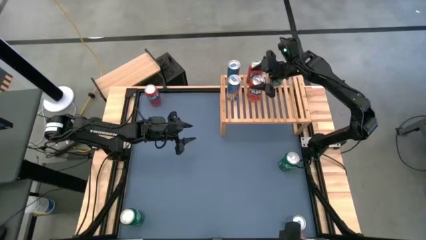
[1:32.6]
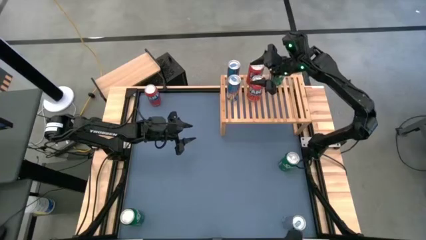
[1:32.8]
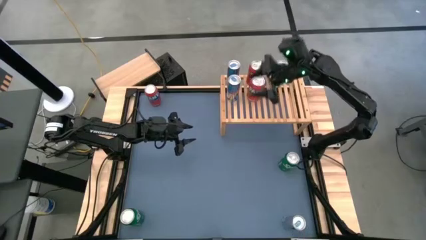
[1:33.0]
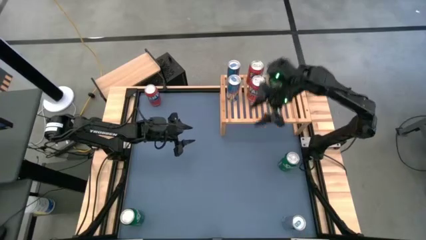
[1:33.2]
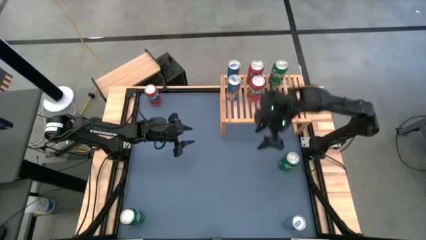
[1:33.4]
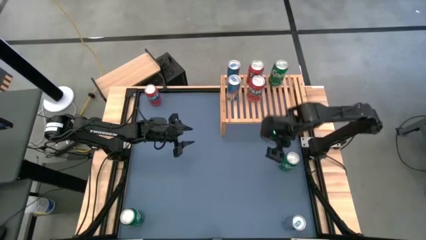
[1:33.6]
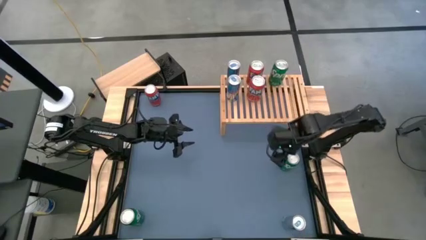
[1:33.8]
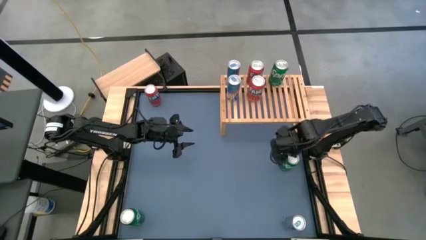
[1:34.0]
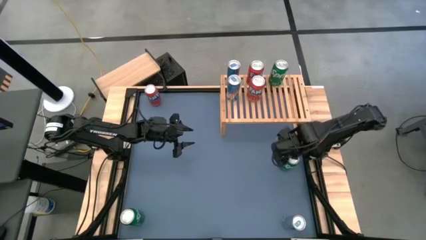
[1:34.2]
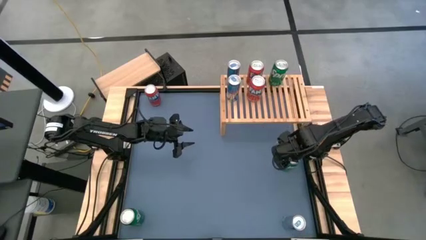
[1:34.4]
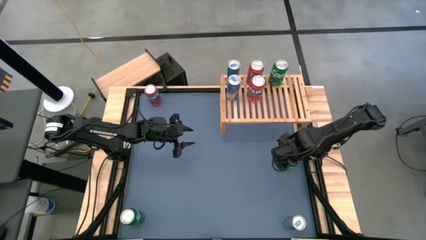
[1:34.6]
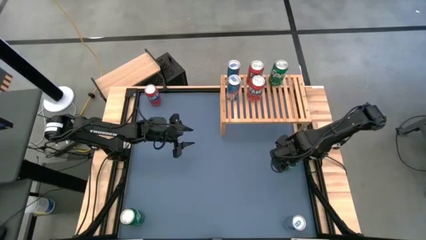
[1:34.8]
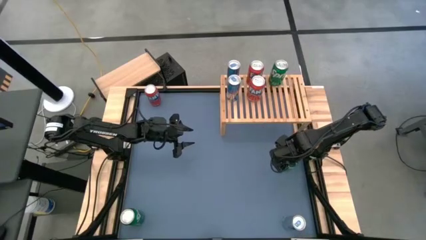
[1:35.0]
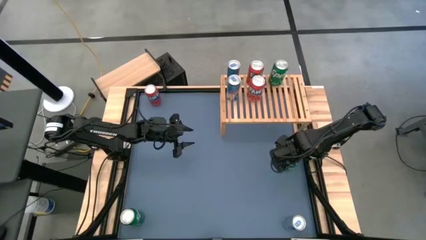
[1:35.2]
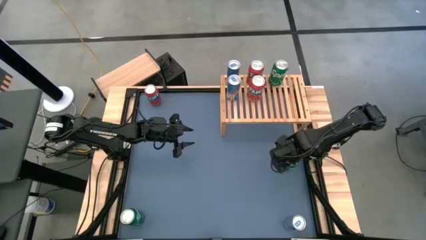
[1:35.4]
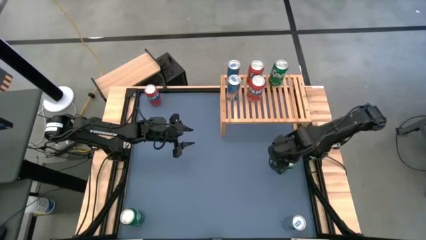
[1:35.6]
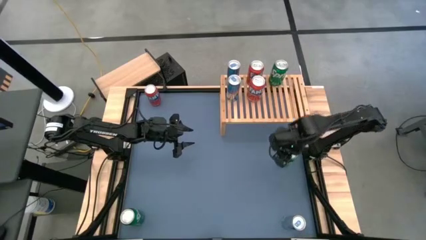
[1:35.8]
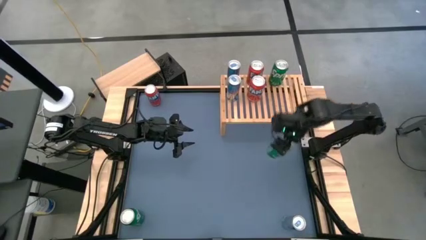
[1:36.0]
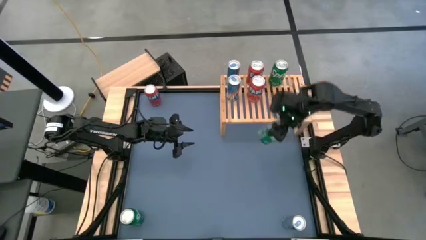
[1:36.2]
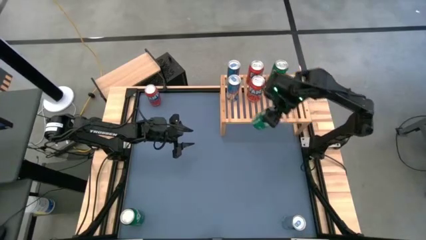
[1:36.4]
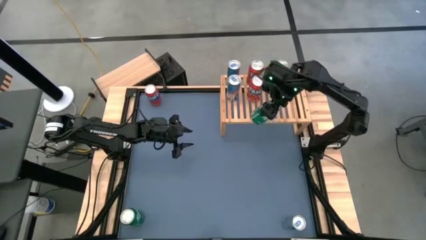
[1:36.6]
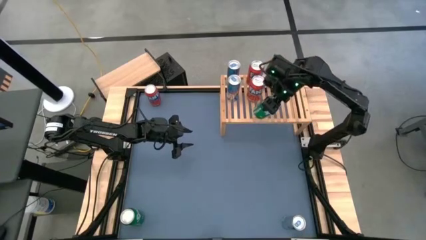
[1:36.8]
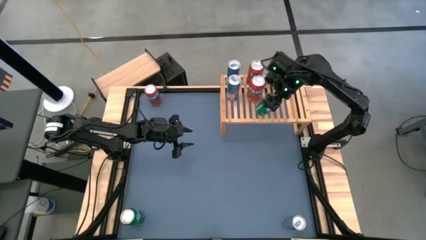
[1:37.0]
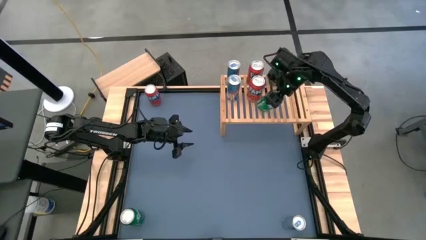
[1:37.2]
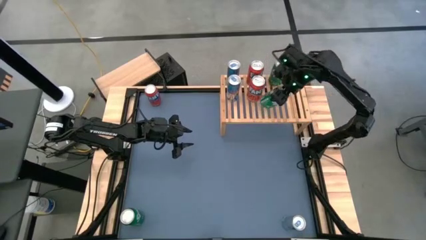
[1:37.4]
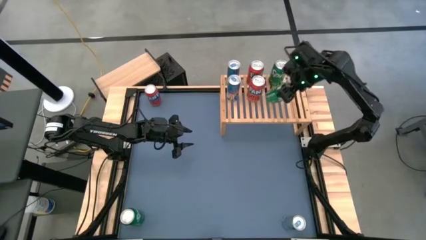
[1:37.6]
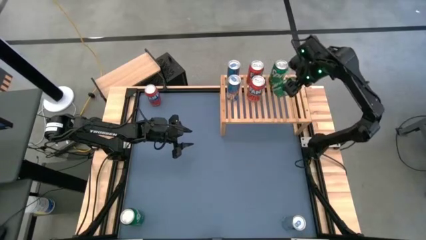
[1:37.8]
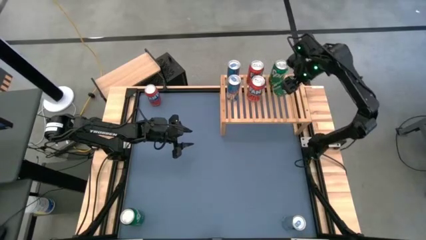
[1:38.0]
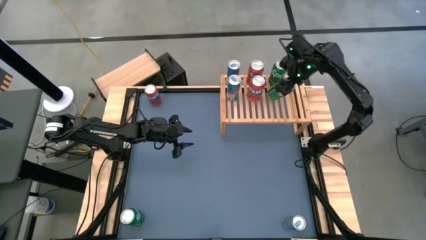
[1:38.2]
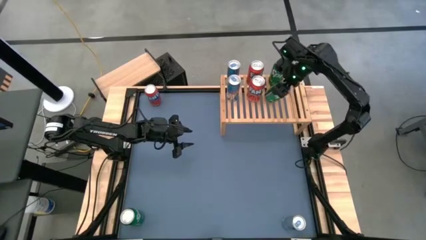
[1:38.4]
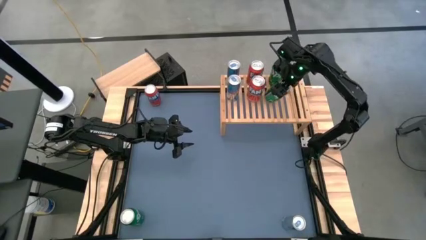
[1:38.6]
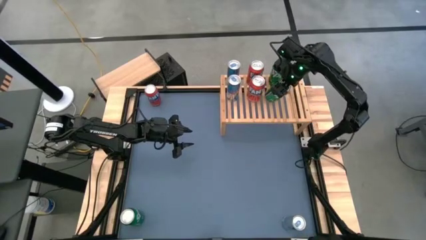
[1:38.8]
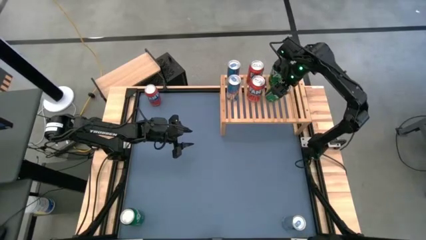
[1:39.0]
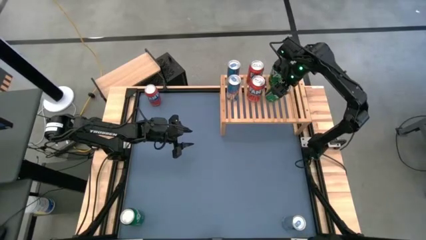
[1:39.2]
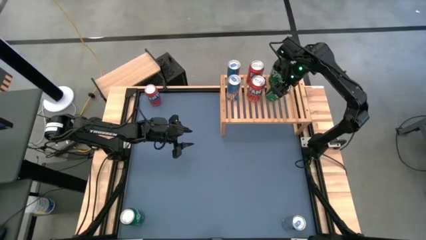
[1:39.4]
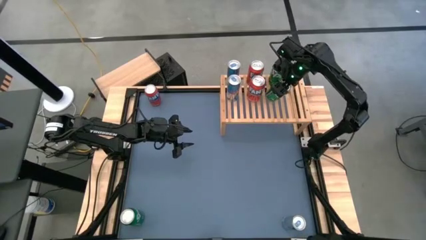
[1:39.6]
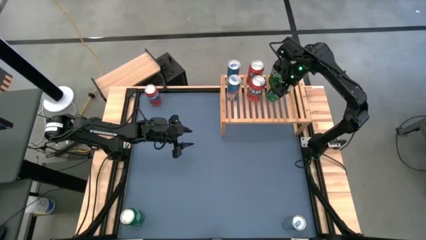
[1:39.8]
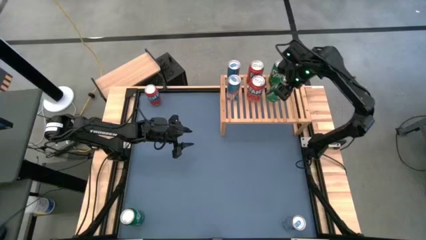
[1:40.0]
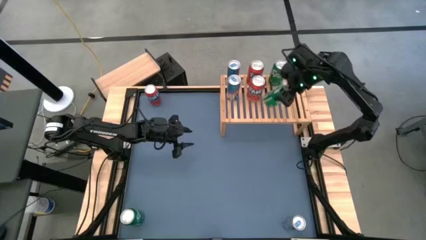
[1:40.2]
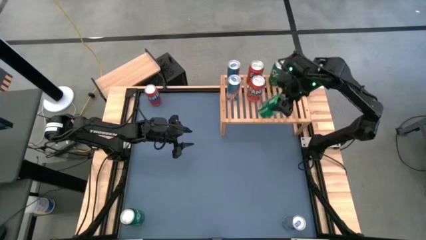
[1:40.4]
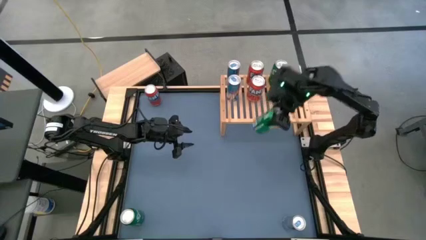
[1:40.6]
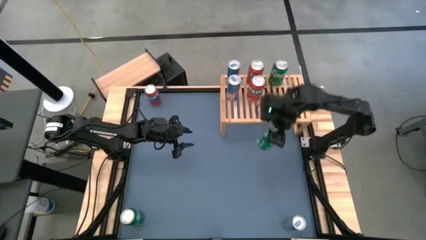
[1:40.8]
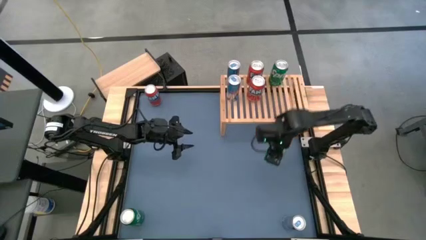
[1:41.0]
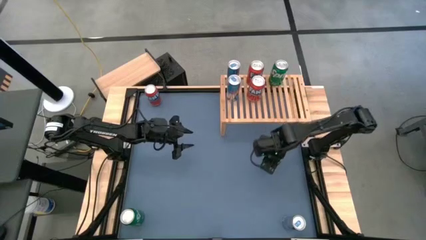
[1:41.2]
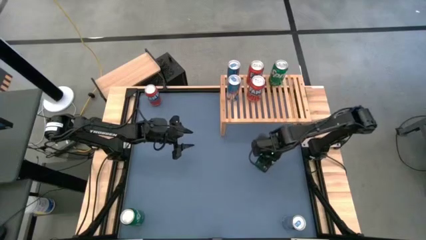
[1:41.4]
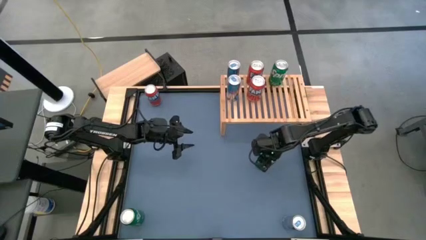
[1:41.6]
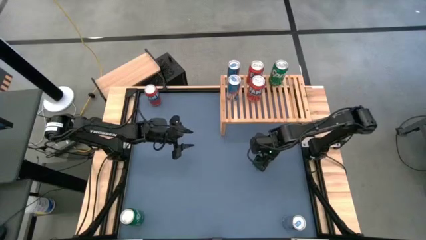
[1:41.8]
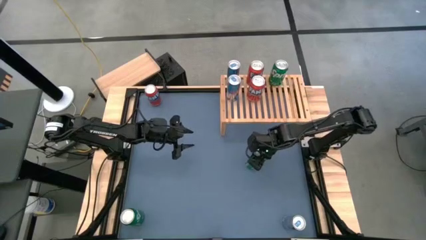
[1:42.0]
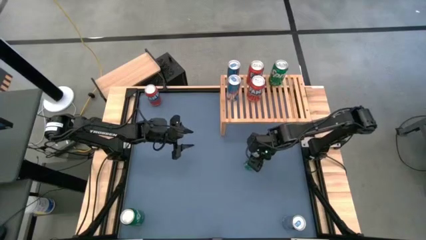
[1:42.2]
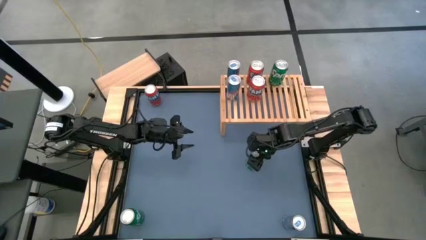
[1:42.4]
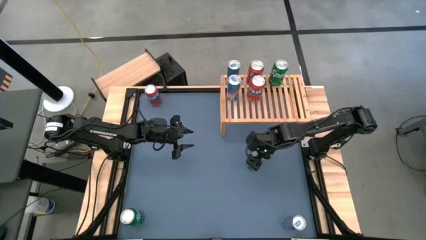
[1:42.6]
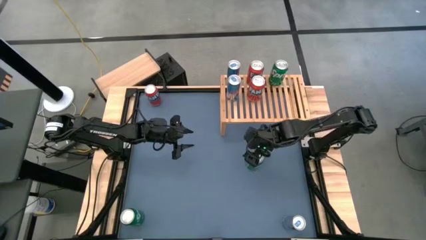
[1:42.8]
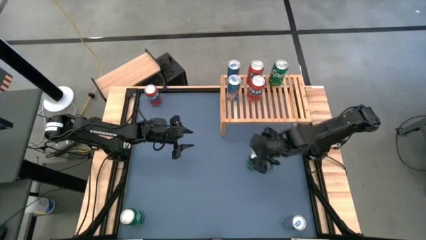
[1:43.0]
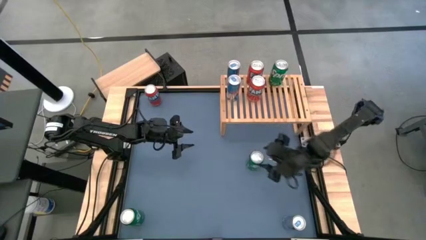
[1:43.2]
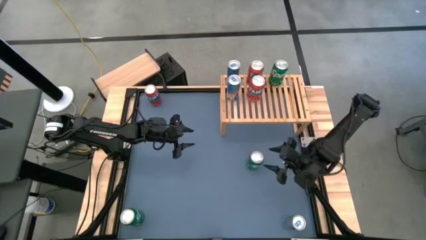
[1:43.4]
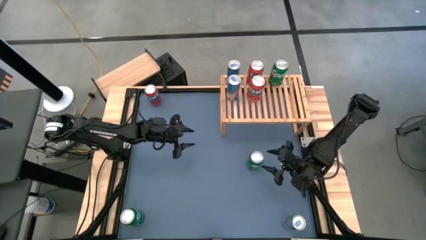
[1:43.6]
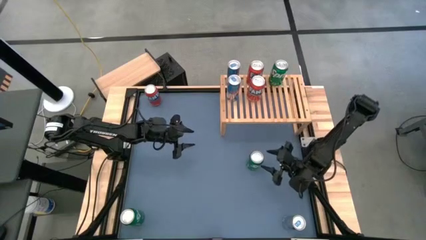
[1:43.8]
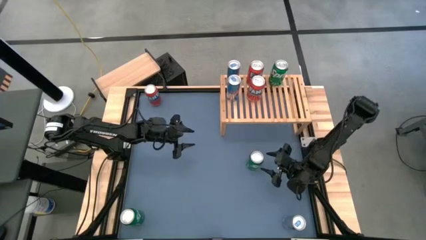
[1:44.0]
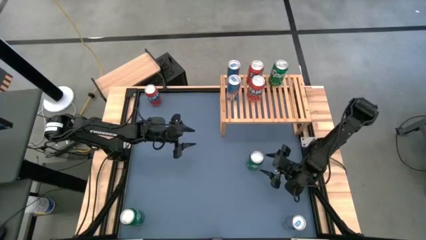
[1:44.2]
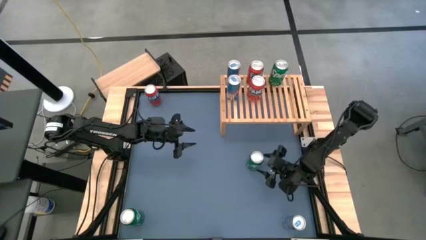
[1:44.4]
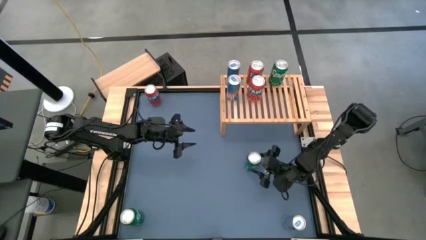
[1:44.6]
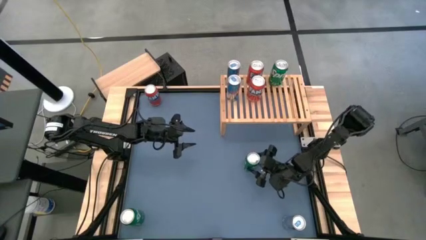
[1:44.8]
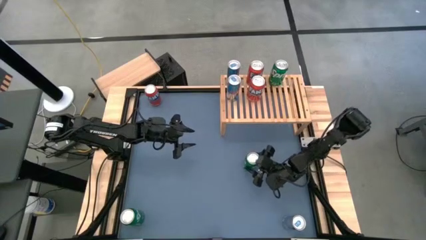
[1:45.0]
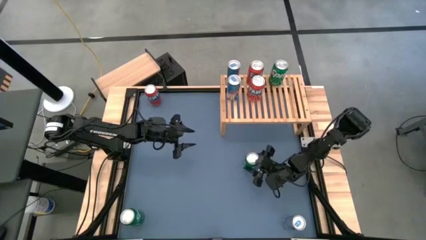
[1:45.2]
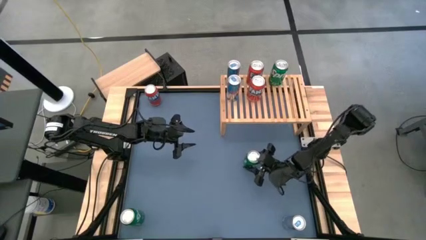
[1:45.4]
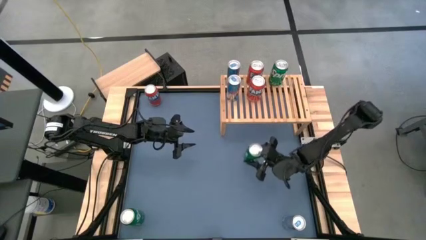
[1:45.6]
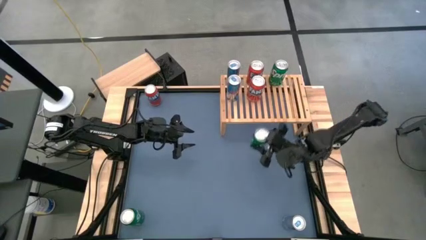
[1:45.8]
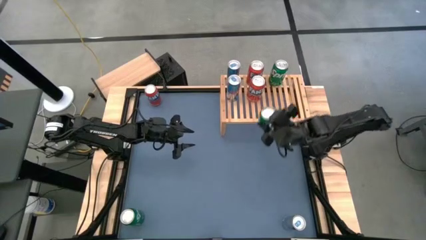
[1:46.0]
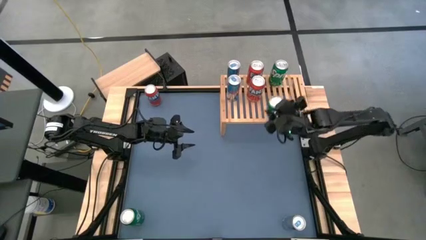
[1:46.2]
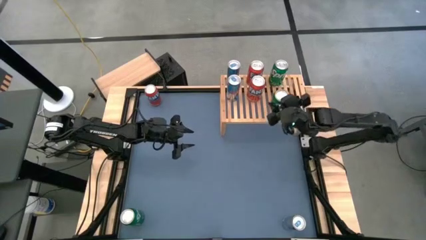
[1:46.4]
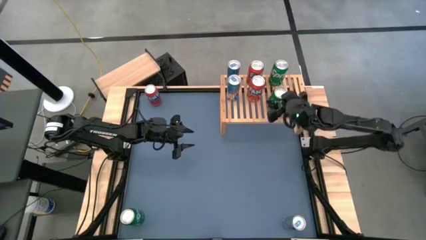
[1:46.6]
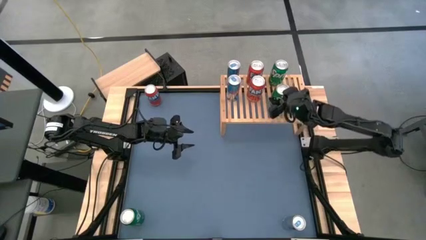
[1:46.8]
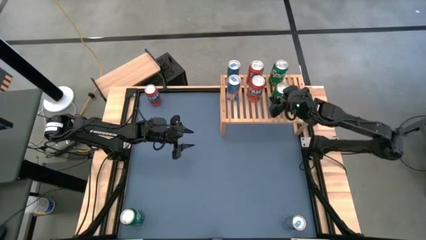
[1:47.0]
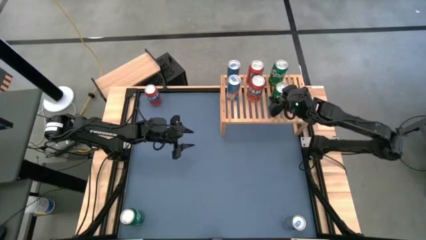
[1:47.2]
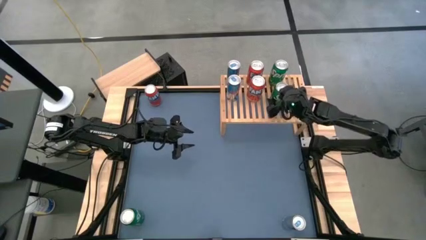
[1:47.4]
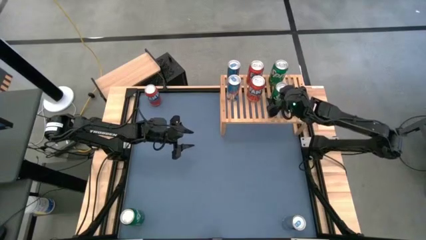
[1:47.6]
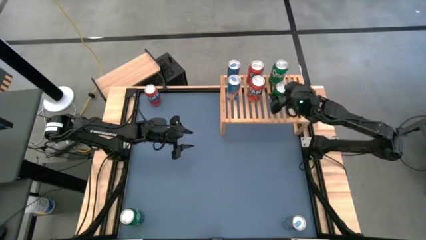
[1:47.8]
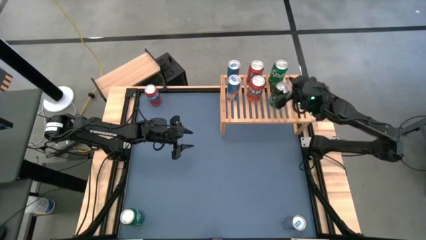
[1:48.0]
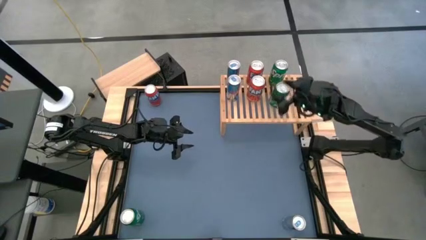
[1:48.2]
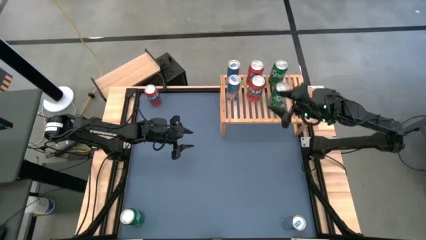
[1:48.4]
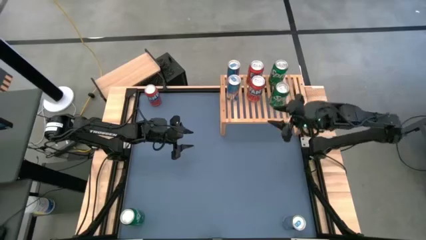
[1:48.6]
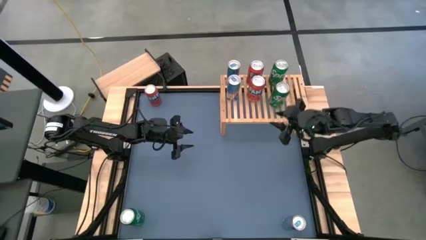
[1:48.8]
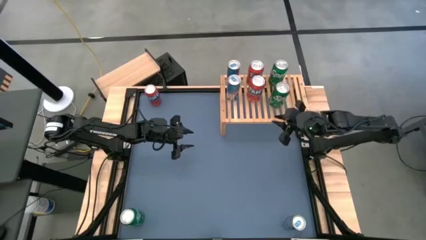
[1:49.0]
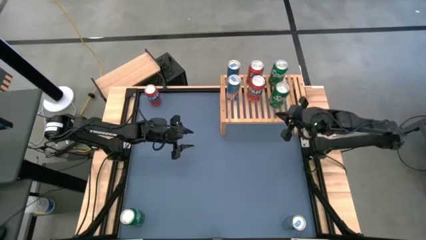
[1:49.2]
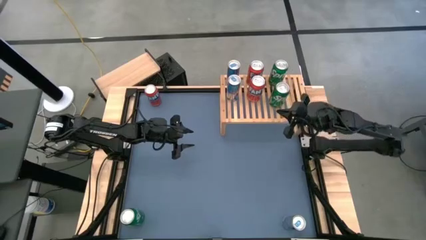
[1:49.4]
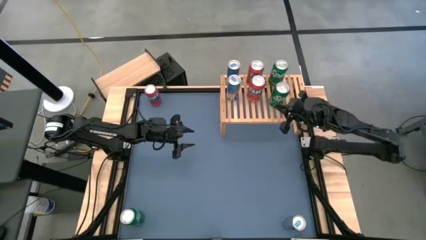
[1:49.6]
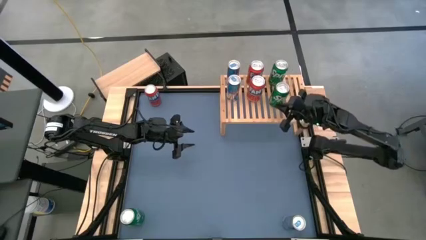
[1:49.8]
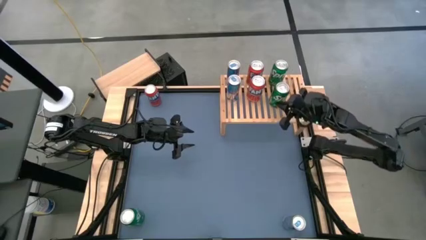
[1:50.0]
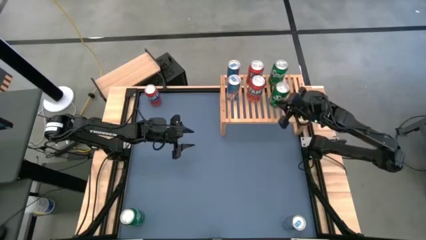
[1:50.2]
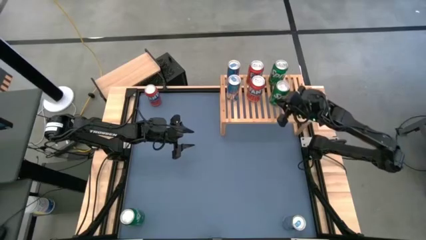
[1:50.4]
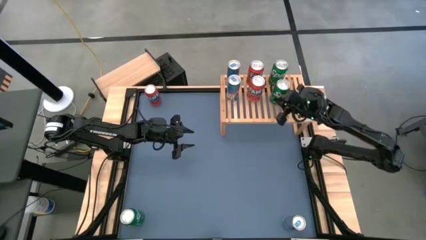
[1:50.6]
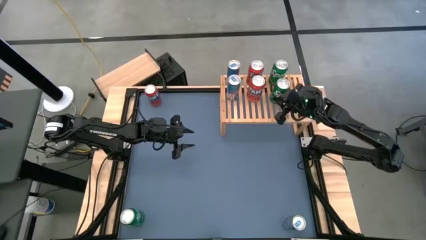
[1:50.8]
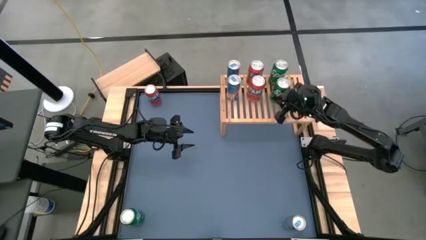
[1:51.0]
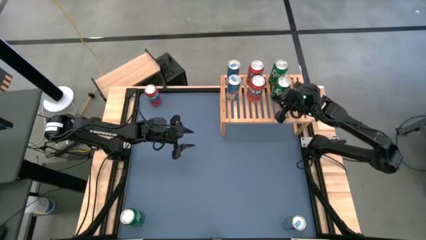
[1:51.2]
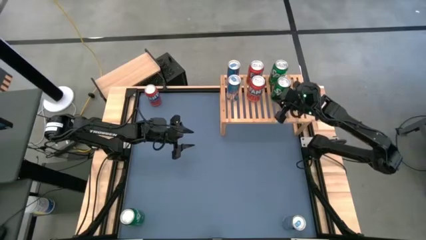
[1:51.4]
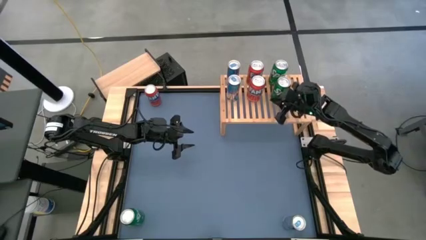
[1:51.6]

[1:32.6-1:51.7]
Task: Place canned beverage on shelf
Put the right green soda can on the shelf aligned with the other green soda can
